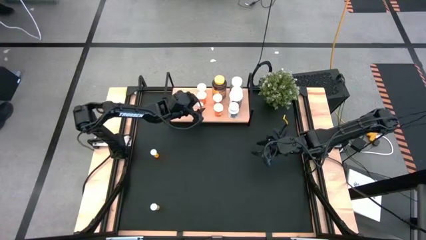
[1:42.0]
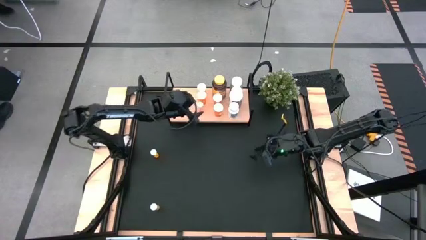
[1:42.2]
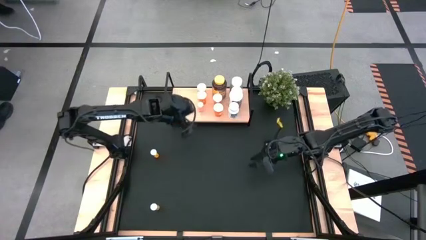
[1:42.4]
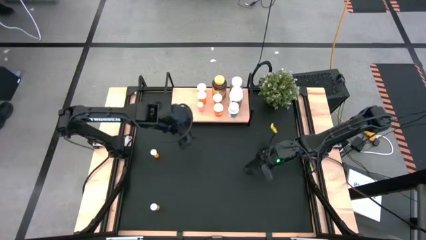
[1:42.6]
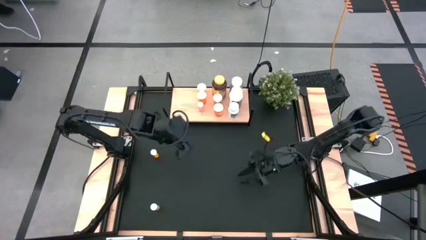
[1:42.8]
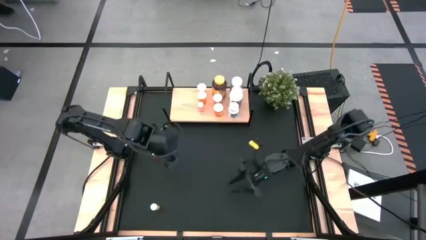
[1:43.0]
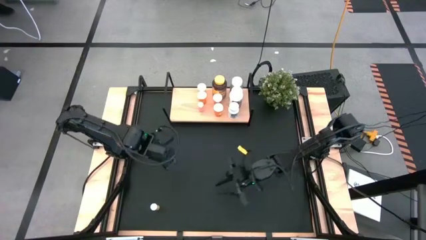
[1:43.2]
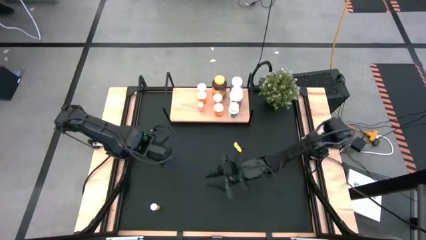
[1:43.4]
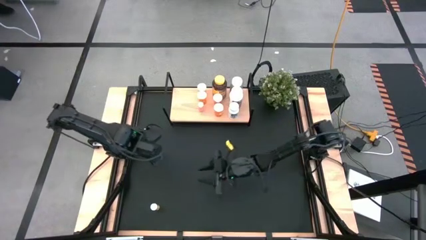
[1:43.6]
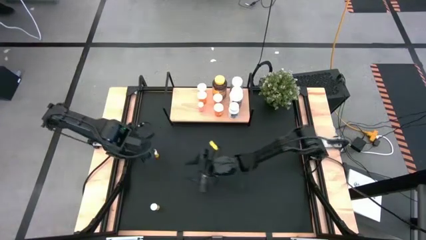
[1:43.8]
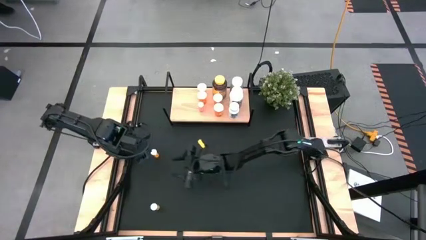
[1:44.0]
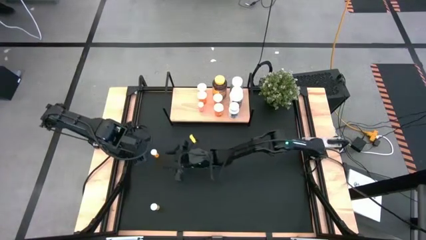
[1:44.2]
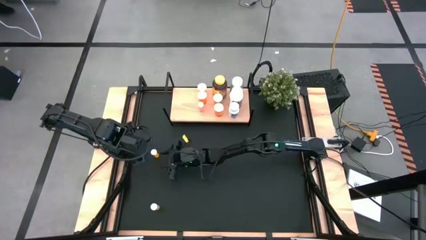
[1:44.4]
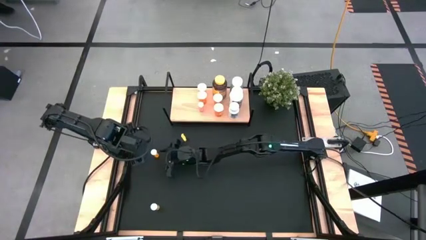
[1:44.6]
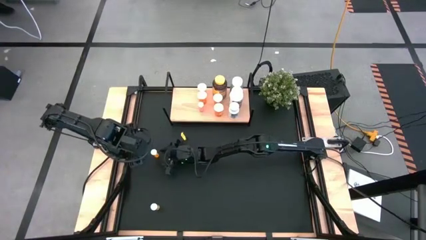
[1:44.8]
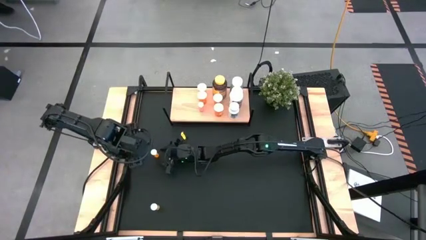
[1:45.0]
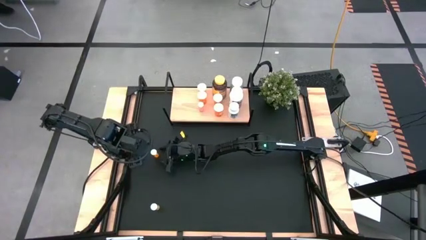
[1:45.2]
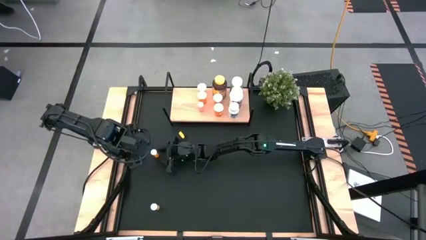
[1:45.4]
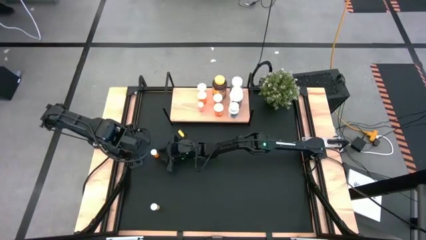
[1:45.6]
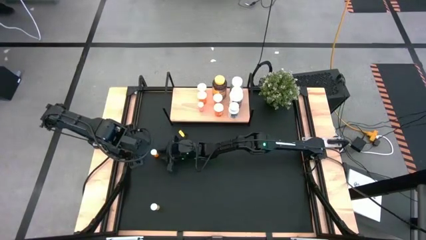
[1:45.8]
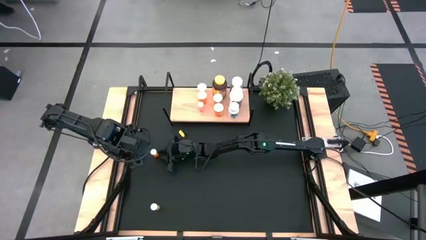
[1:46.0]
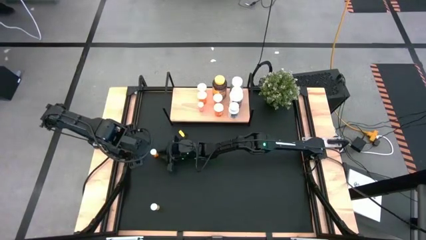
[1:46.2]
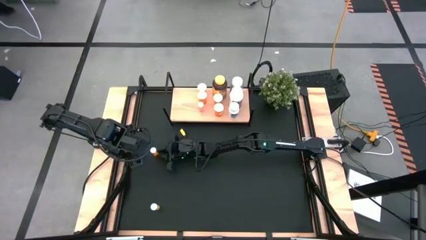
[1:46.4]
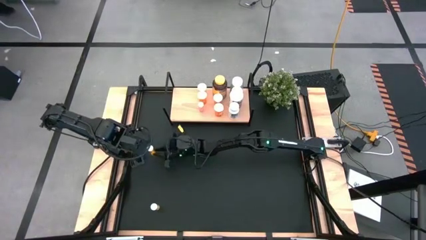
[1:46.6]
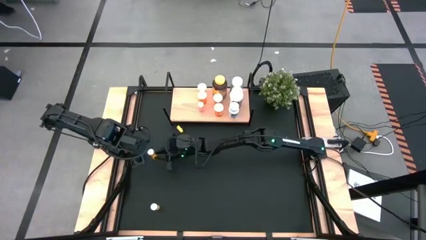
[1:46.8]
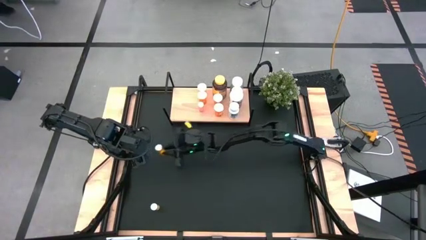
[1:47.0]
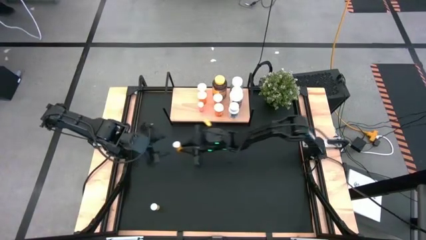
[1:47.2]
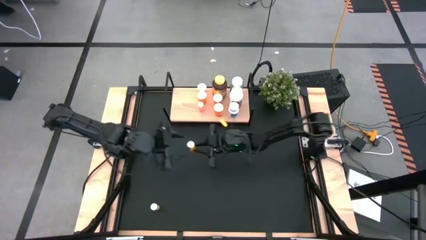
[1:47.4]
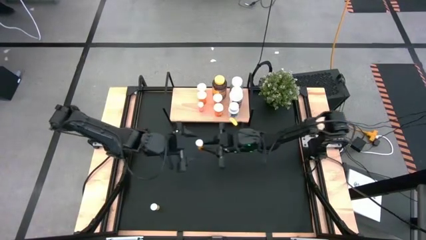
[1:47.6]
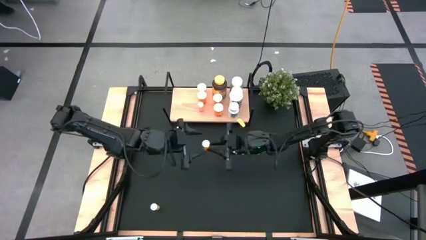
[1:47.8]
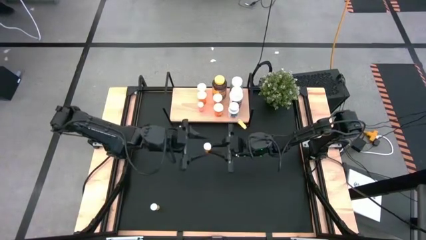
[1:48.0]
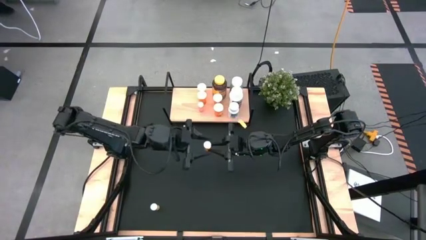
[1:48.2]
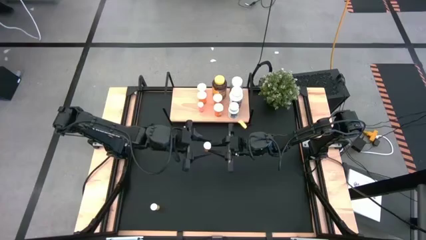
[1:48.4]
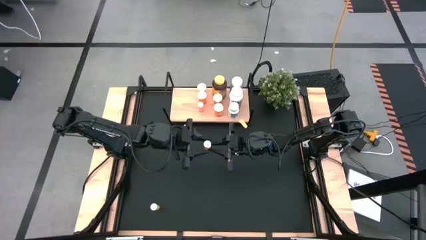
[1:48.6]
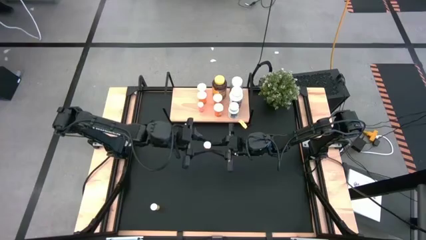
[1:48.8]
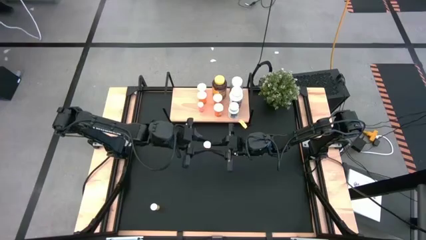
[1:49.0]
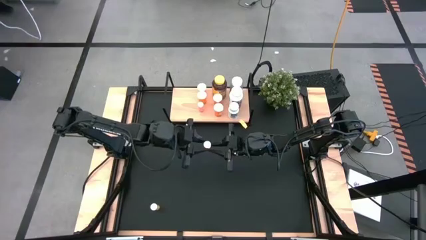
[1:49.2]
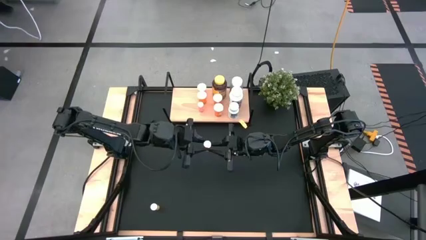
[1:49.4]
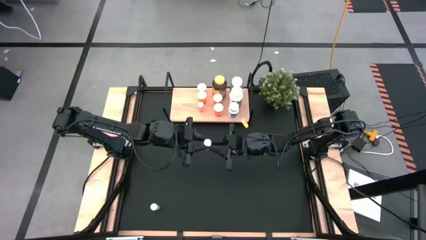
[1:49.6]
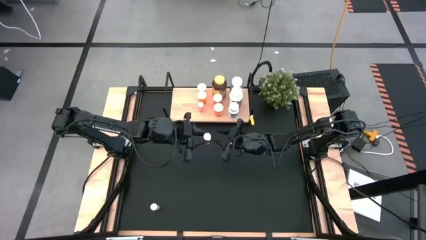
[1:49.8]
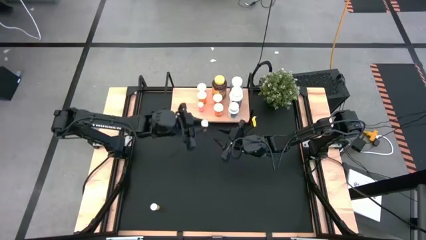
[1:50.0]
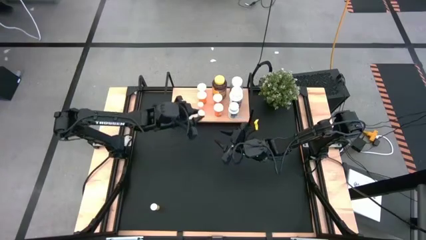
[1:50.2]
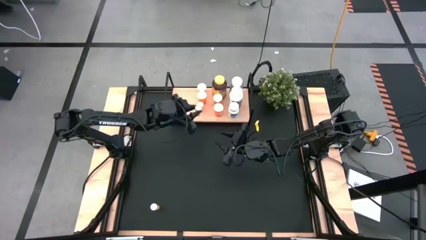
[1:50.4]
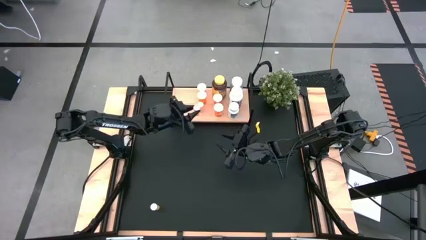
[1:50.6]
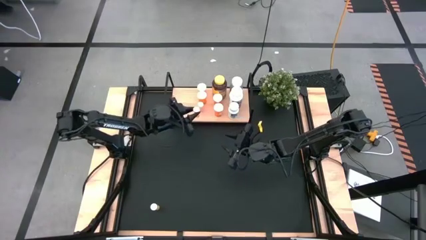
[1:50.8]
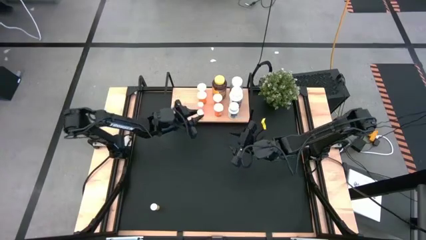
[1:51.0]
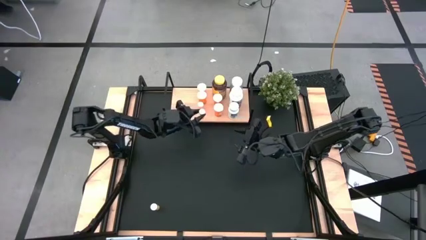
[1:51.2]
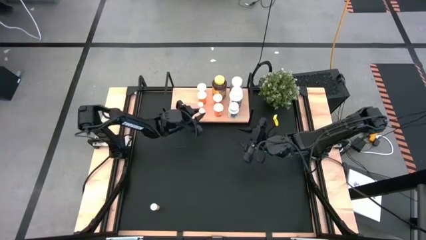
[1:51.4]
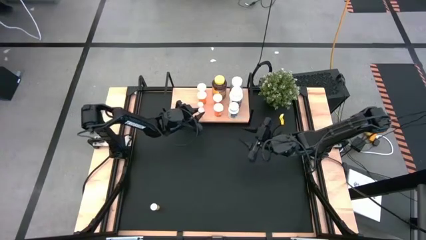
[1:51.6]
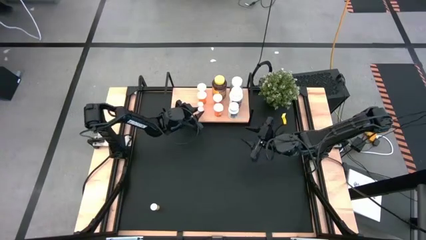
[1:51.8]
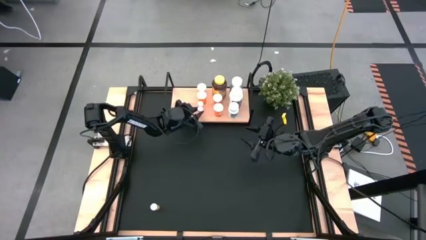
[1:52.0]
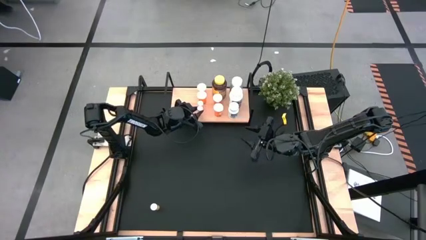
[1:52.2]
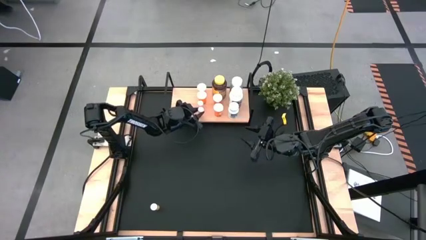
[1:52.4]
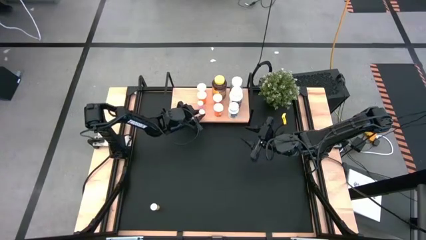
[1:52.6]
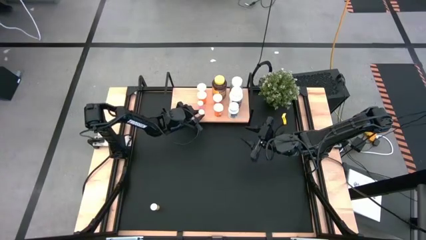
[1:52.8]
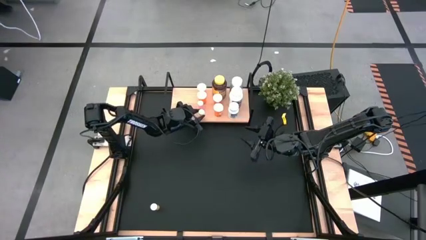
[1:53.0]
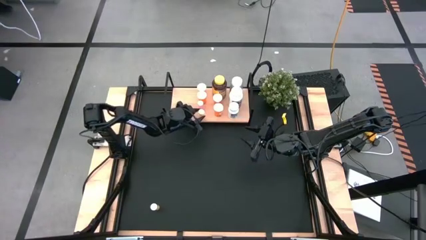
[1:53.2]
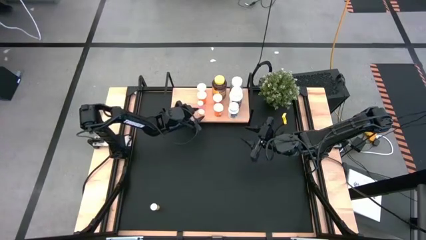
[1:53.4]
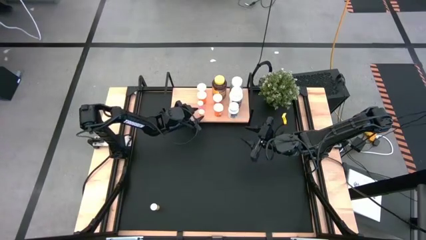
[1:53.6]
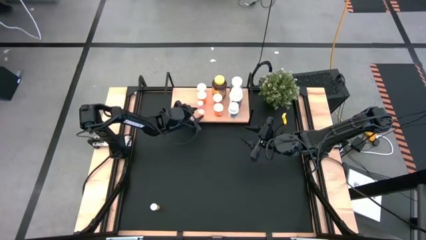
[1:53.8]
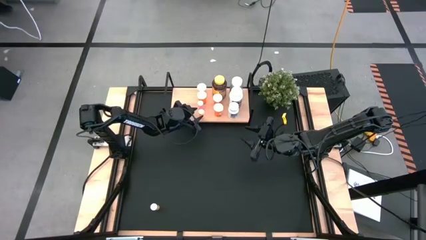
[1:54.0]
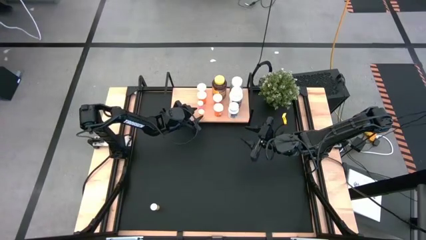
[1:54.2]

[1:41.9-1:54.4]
Task: Pick and place medicine bottles onto shelf by color
Put the orange pill bottle on the shelf aligned with the other orange pill bottles

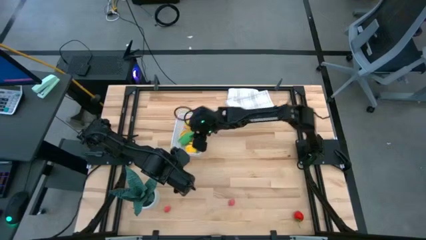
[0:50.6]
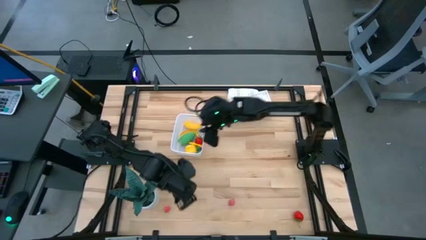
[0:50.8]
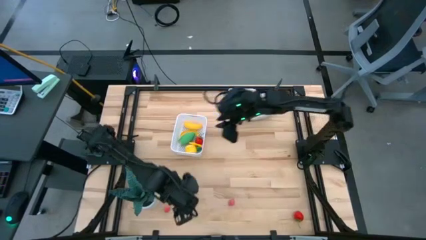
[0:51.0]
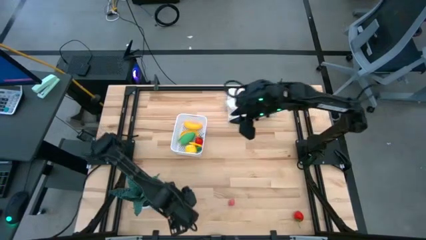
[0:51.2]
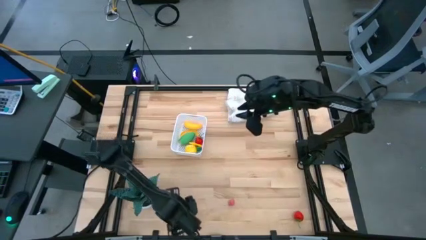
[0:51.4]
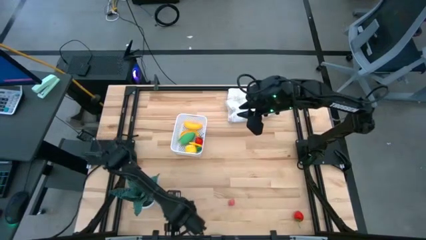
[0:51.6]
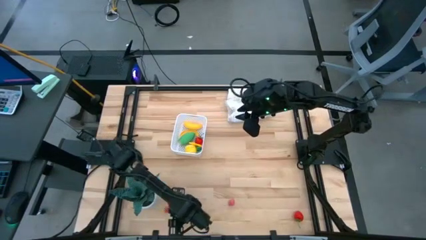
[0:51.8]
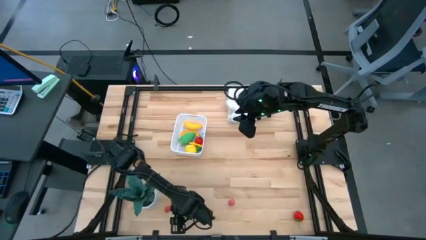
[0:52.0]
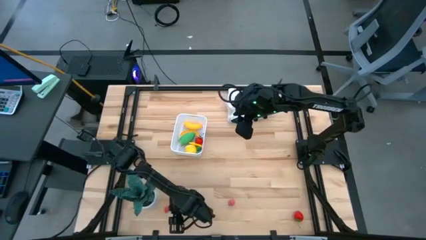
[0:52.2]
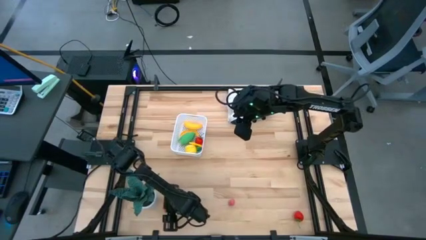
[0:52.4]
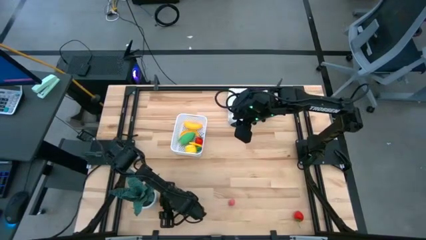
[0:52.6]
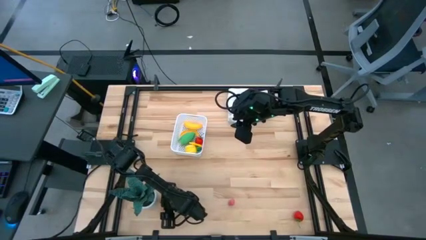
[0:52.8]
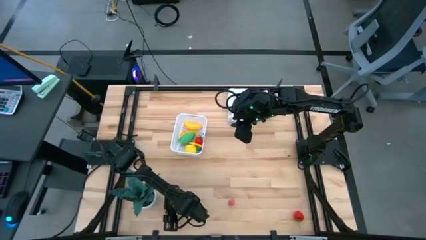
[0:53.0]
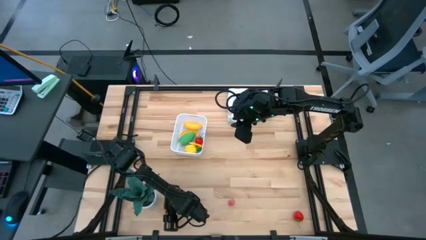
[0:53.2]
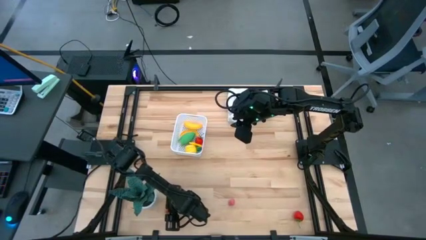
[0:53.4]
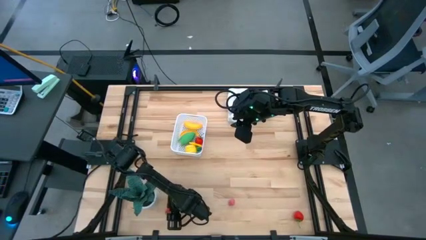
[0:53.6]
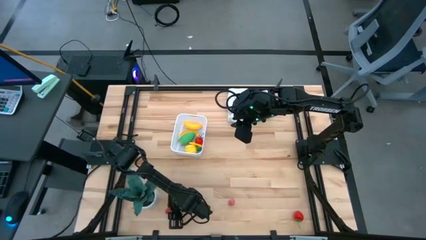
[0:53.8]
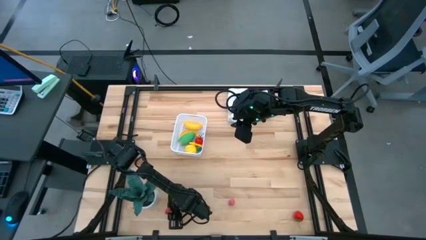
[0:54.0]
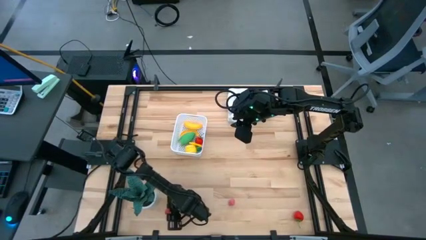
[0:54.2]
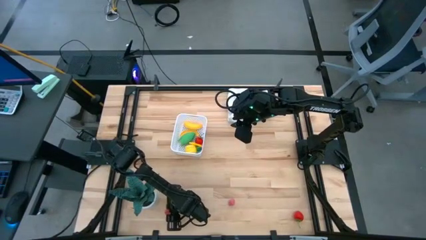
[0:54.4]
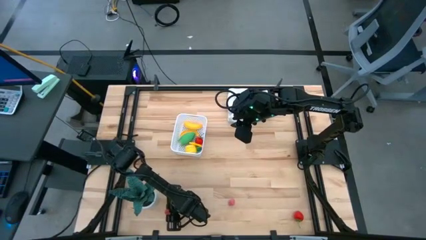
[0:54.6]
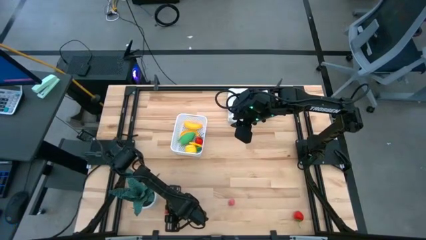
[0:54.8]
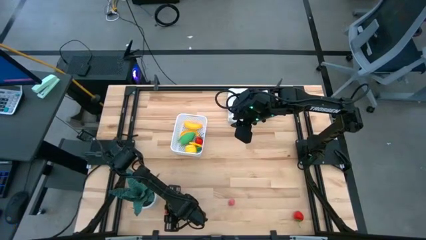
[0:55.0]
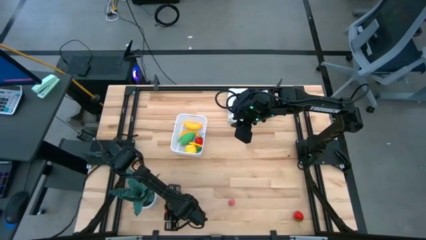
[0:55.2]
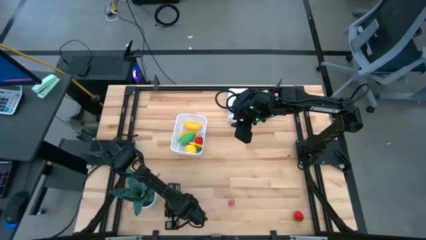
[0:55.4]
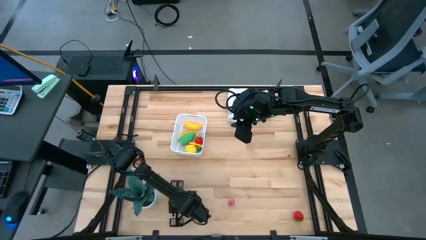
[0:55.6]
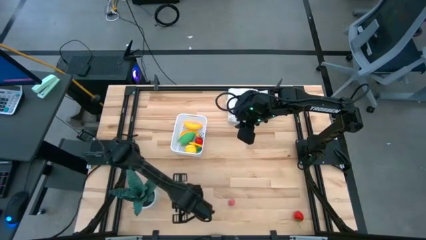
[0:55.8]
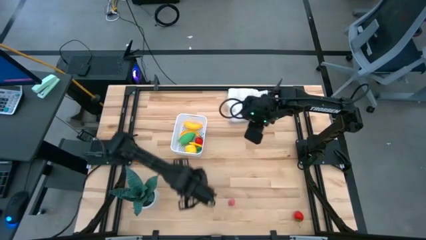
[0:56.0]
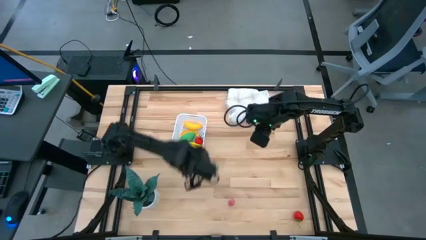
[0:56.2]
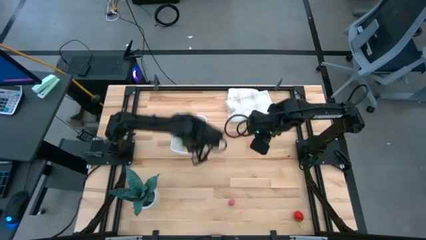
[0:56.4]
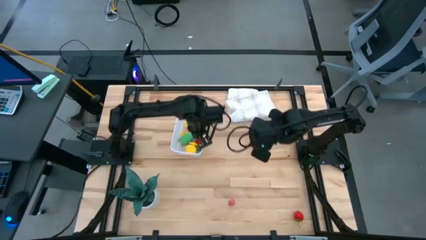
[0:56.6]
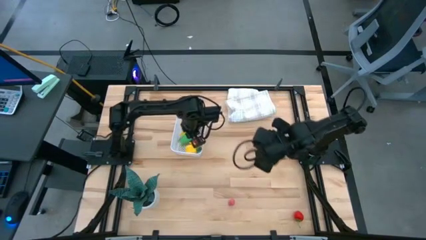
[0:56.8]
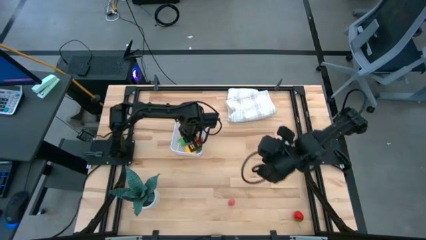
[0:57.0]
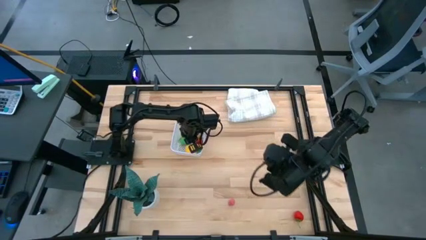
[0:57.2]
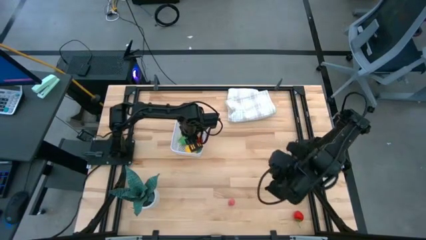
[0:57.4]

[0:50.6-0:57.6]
Task: Pick and placing Produce into tupperware
Put the left peach into the white basket
